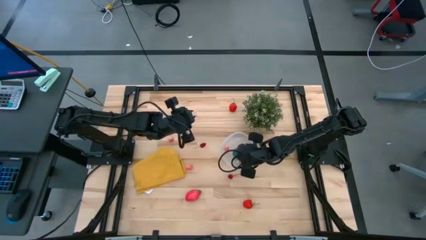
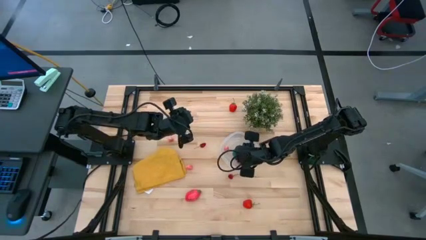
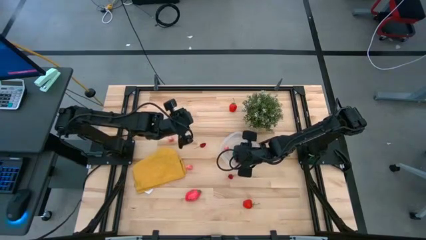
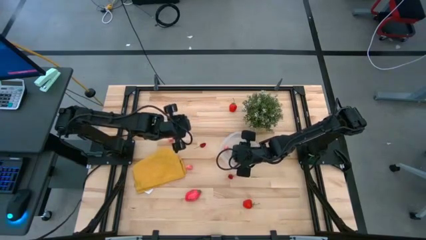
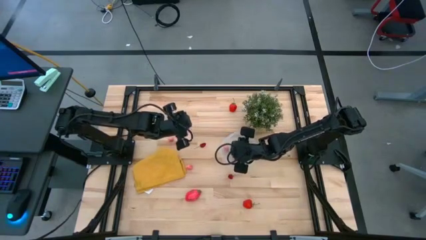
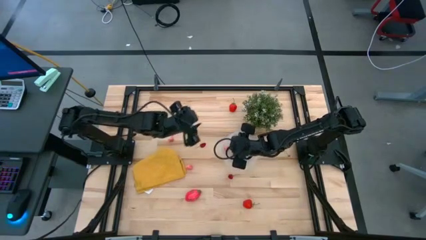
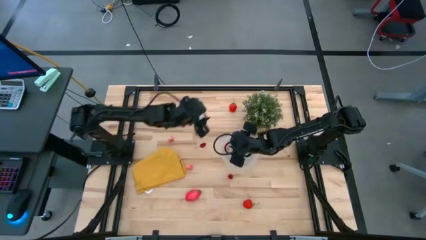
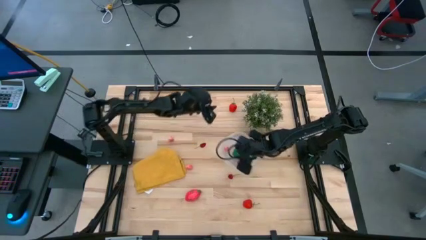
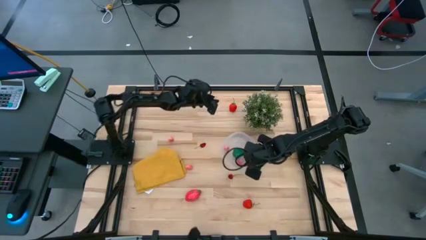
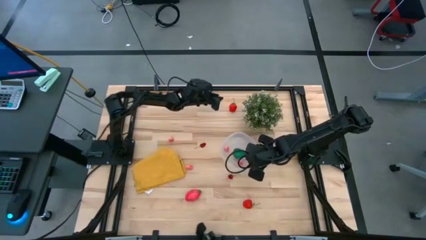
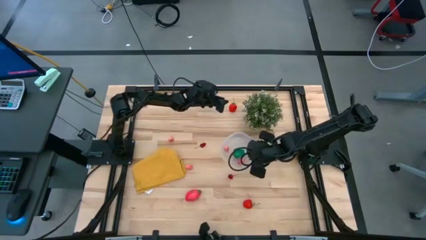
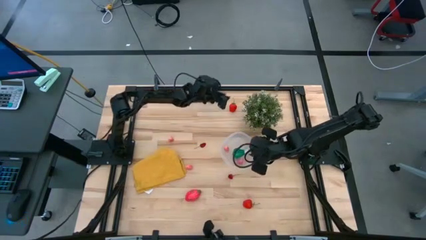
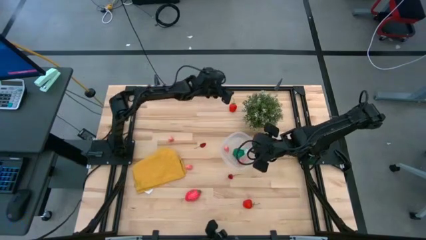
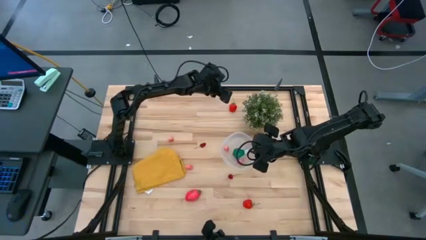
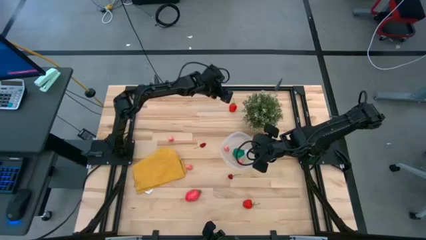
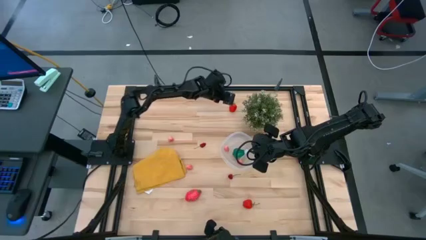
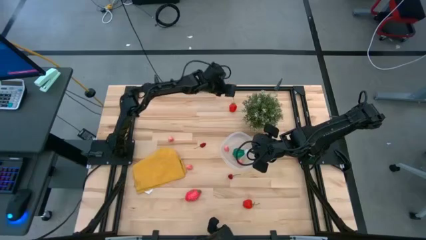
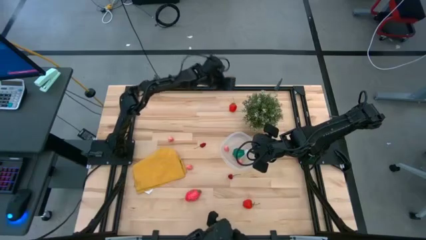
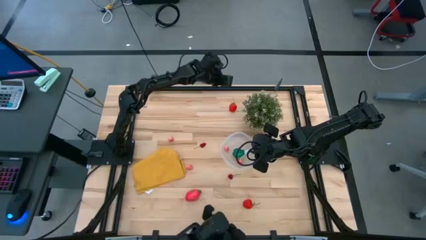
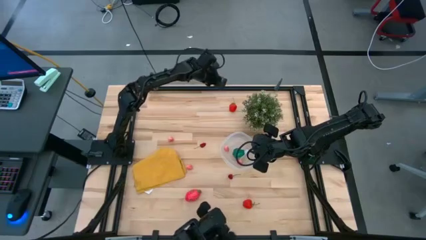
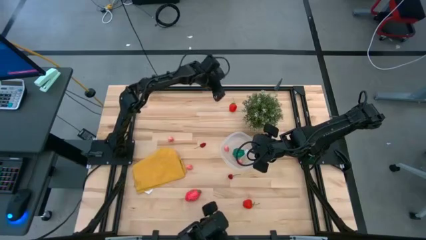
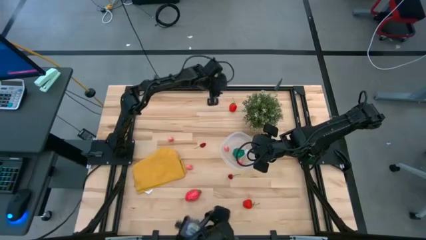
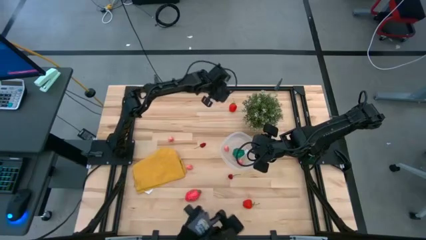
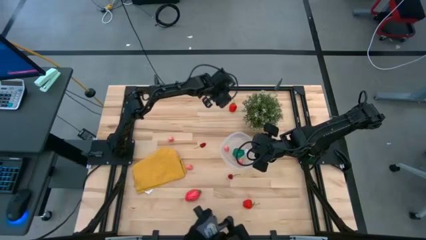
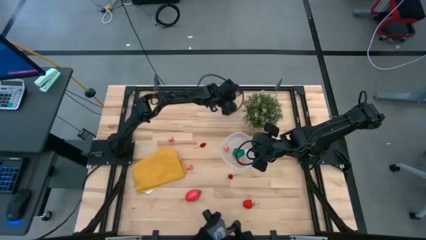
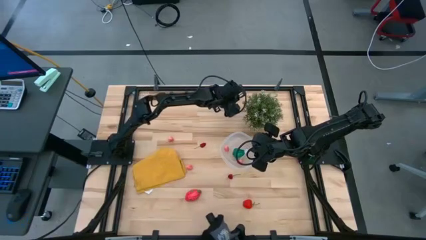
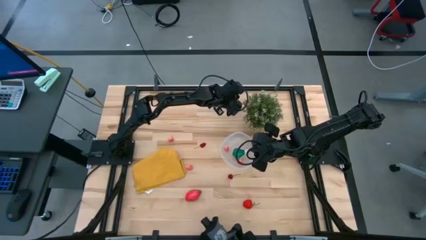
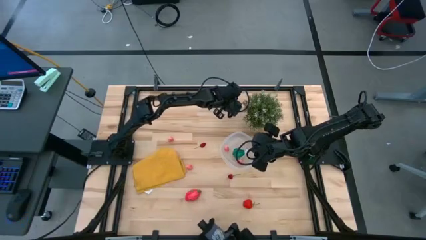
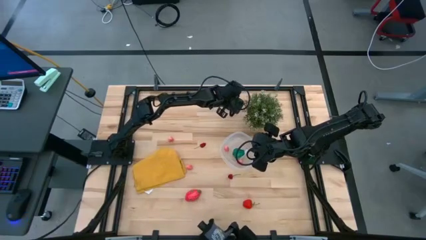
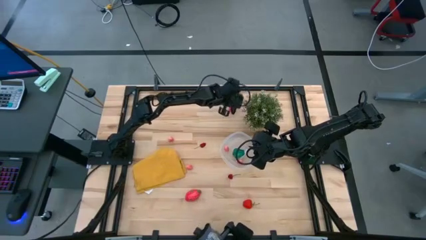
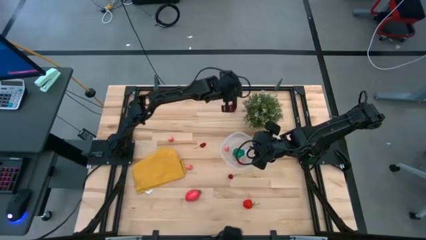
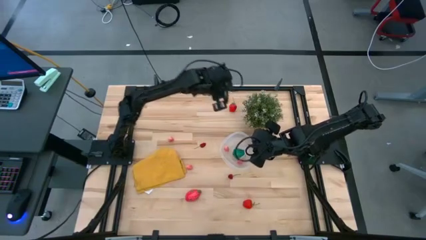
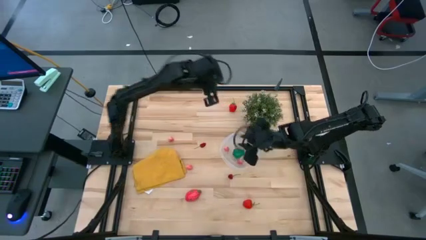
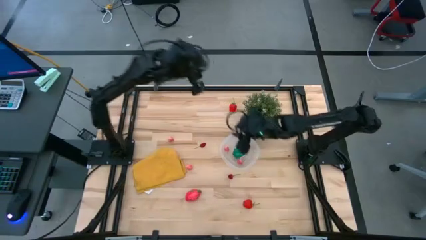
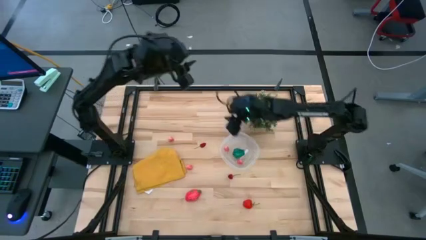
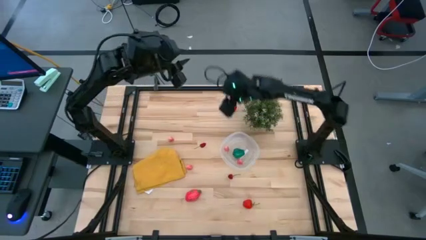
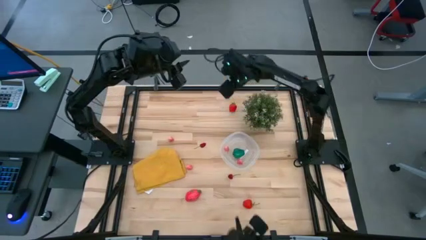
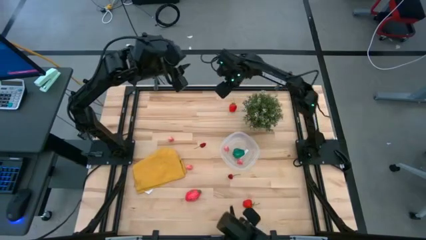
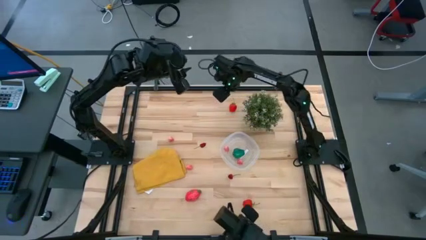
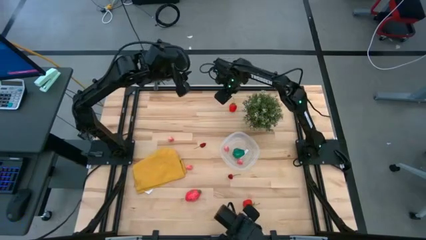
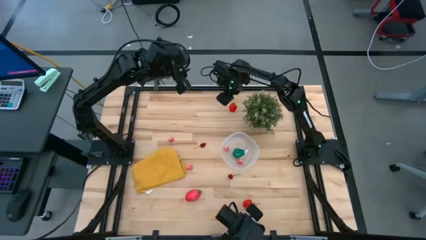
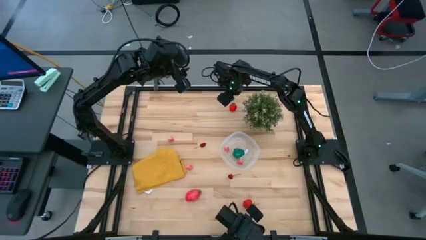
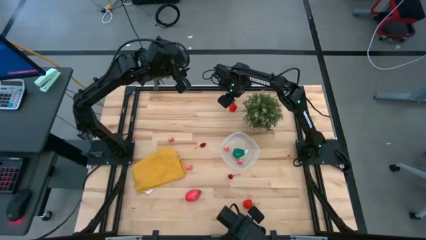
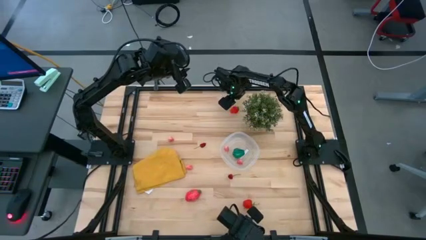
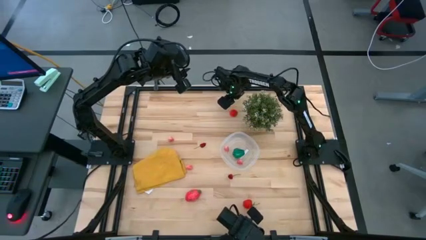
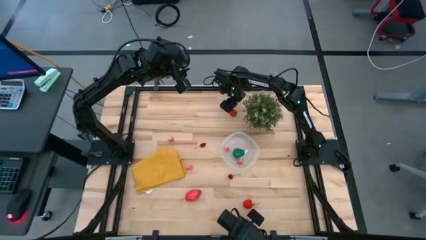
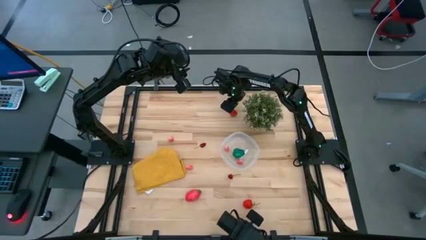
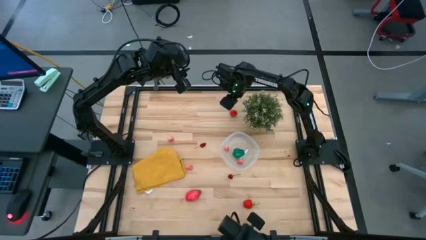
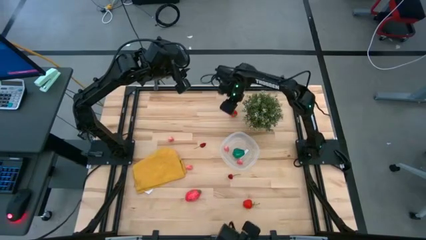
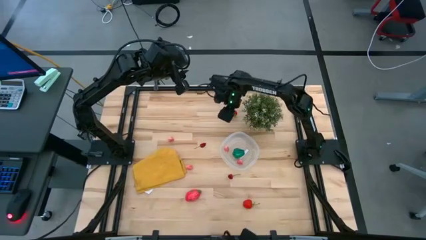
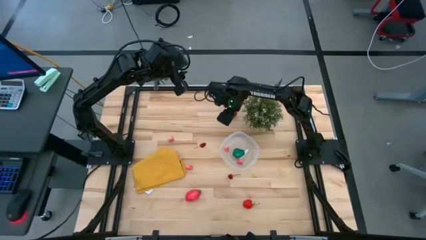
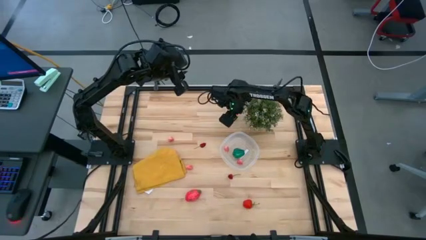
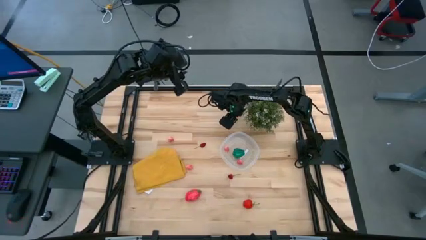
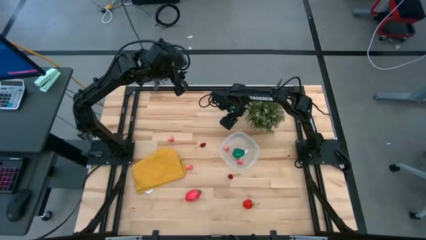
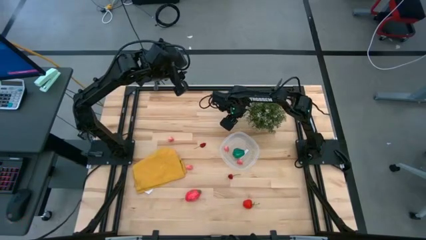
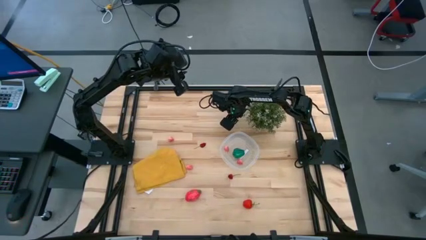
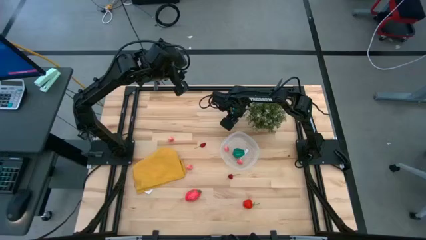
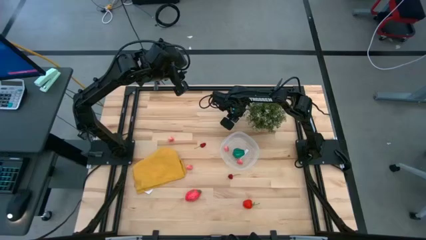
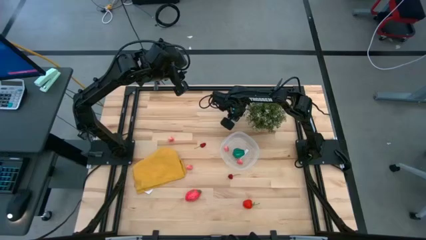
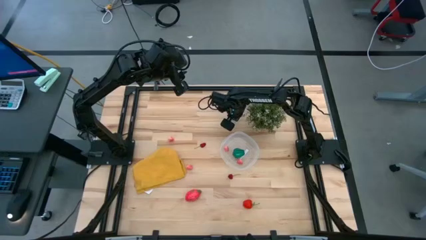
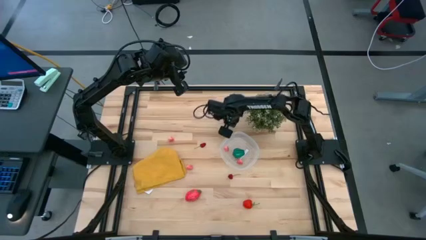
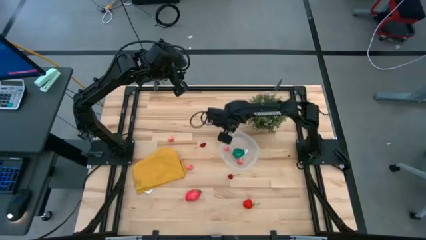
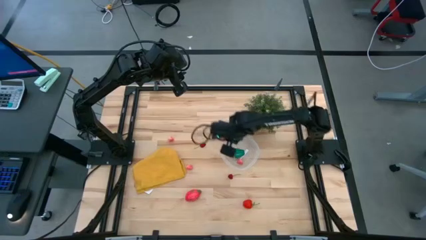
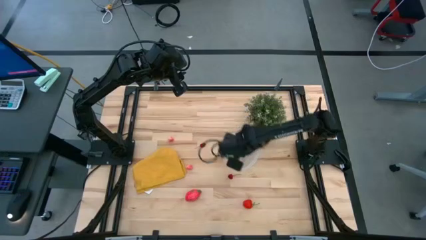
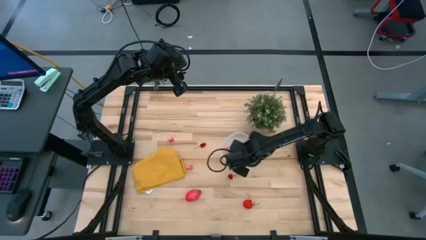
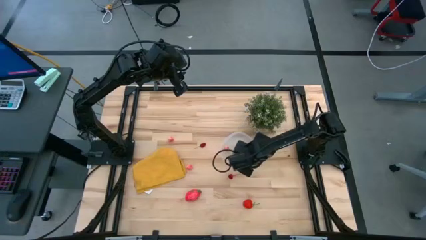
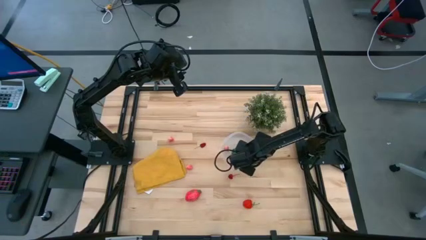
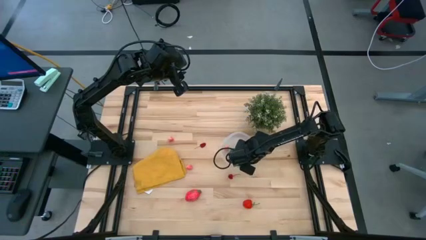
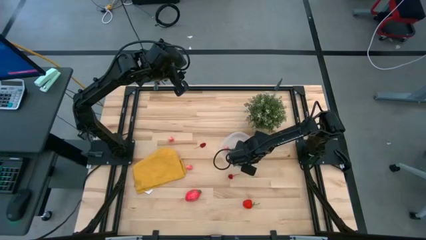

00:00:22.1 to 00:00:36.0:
Task: Pick and placing Produce into tupperware
Put the strawberry into the transparent bin

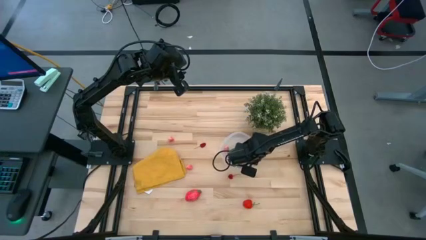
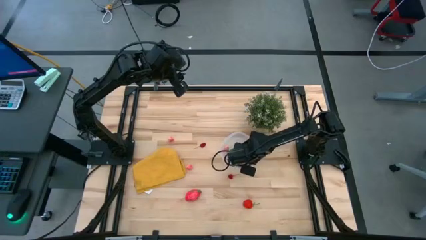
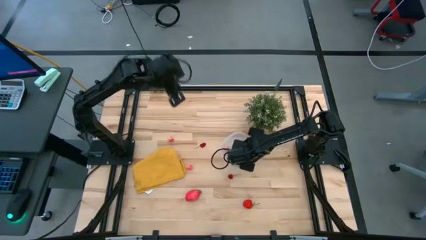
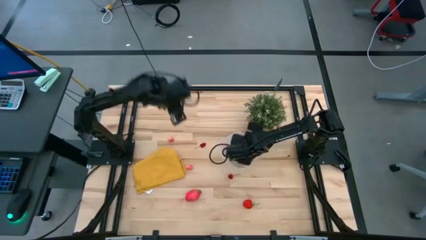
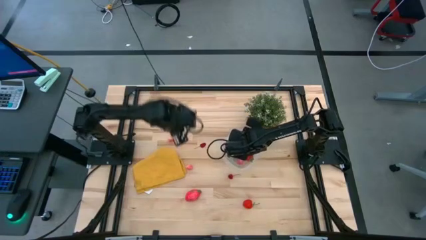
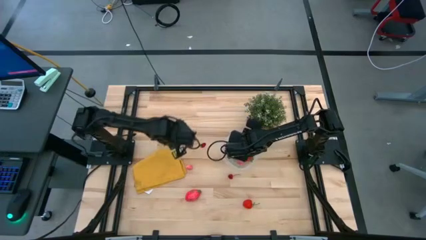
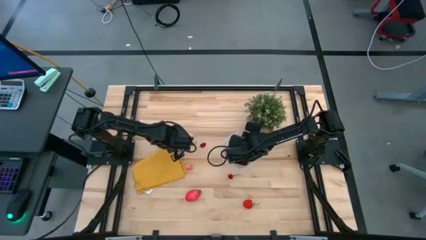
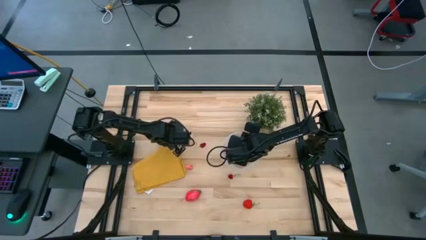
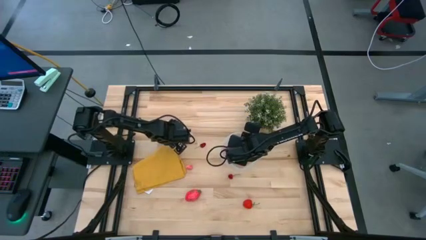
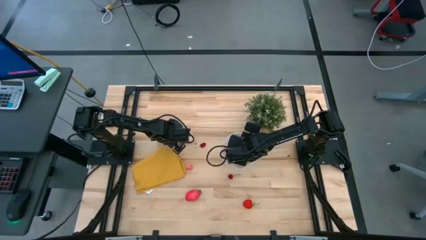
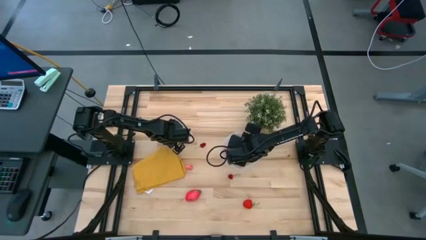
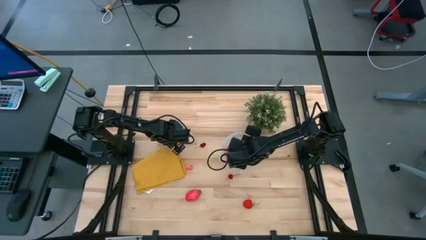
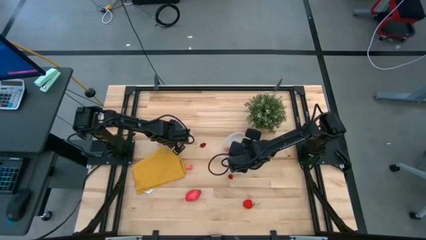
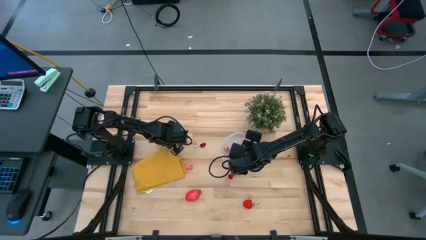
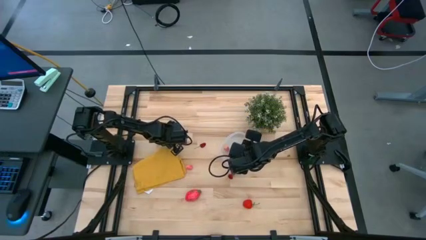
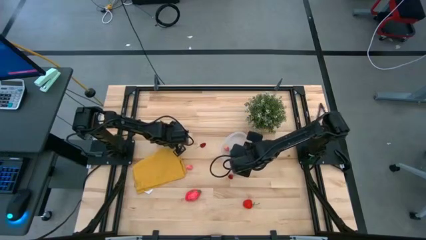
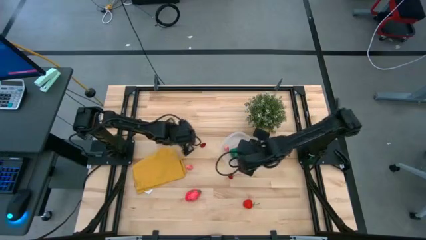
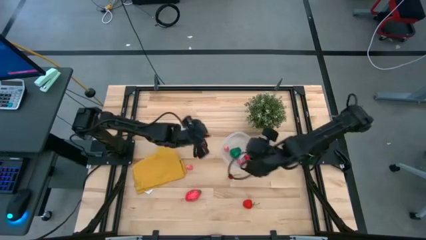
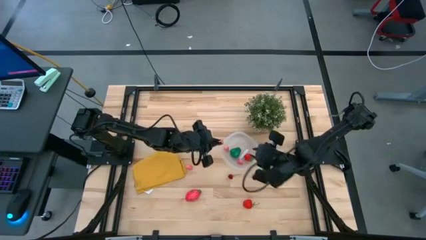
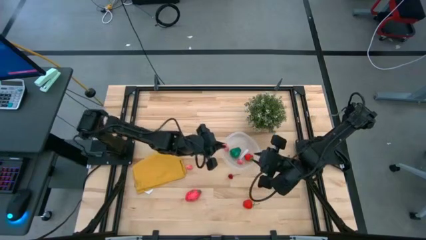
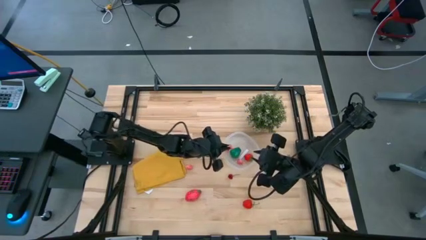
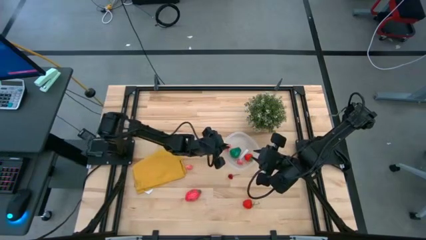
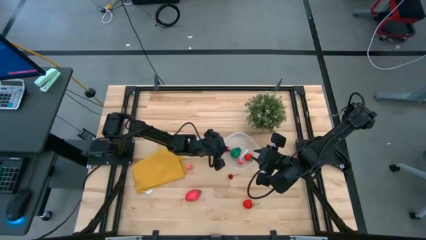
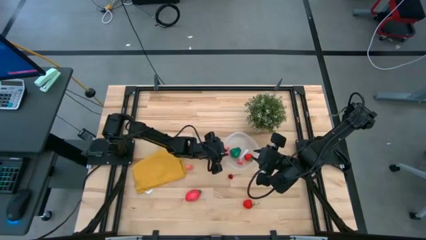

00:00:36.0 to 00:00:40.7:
Put the peach into the transparent bin
